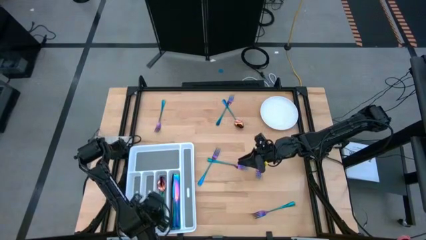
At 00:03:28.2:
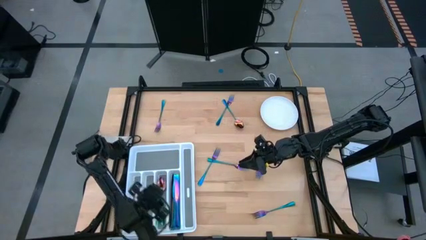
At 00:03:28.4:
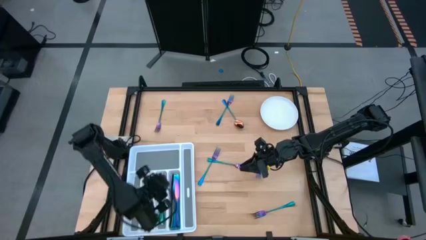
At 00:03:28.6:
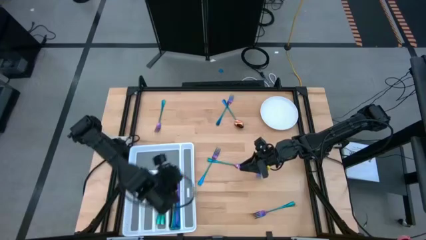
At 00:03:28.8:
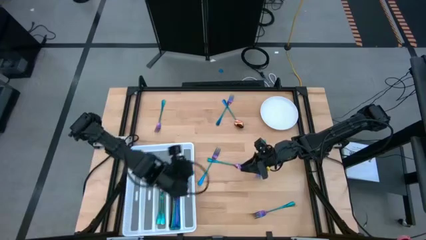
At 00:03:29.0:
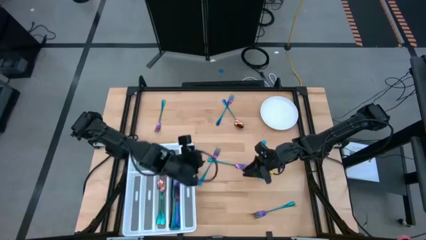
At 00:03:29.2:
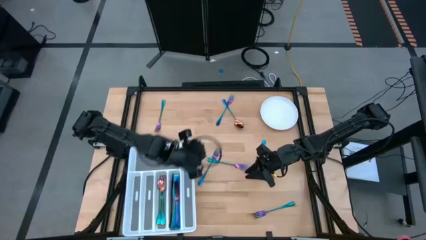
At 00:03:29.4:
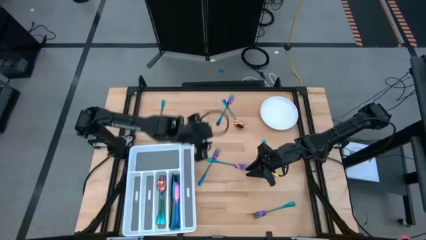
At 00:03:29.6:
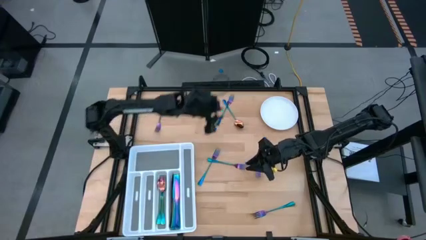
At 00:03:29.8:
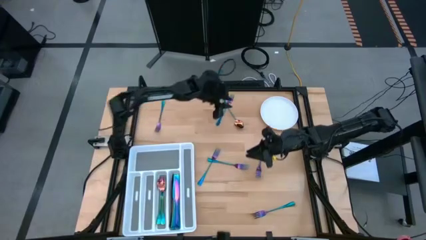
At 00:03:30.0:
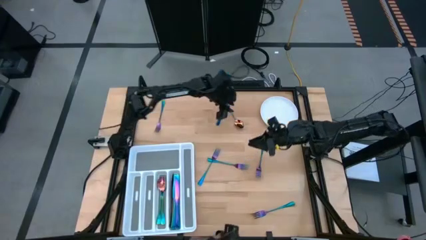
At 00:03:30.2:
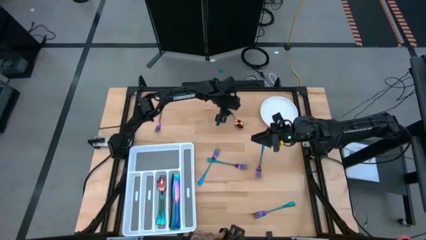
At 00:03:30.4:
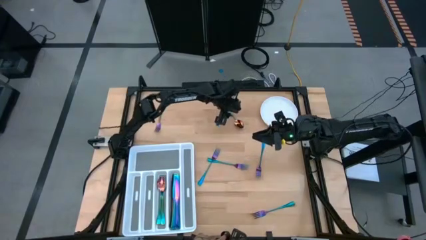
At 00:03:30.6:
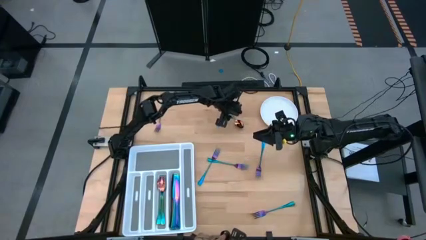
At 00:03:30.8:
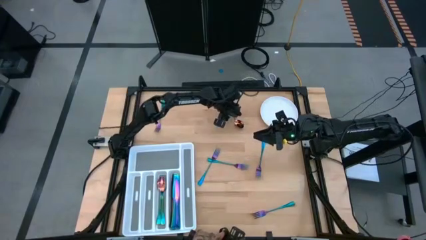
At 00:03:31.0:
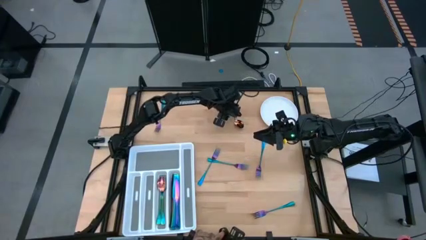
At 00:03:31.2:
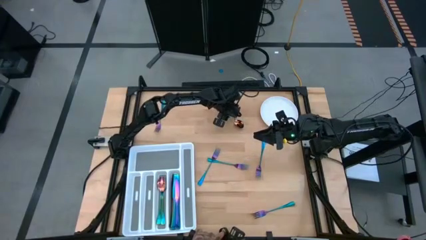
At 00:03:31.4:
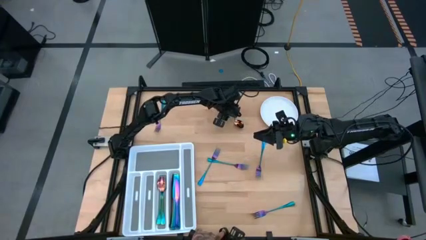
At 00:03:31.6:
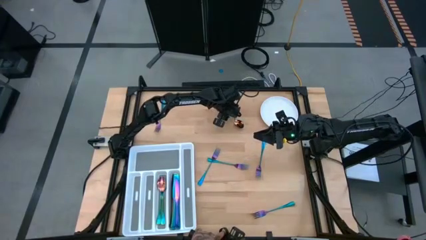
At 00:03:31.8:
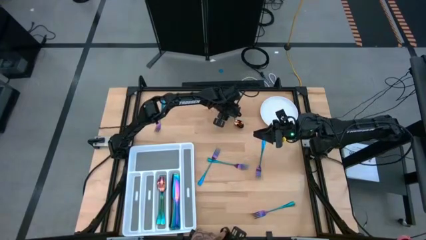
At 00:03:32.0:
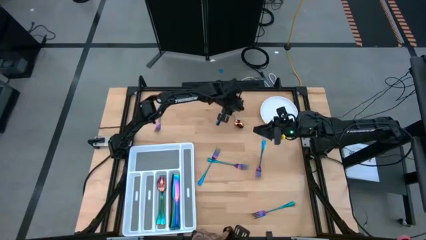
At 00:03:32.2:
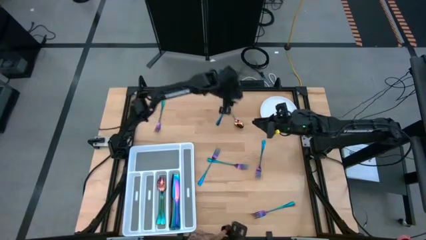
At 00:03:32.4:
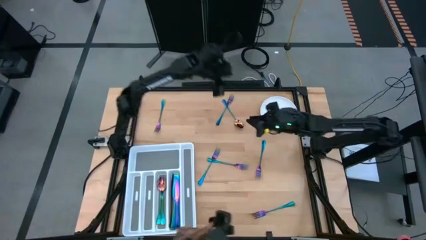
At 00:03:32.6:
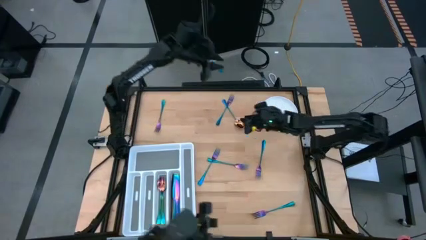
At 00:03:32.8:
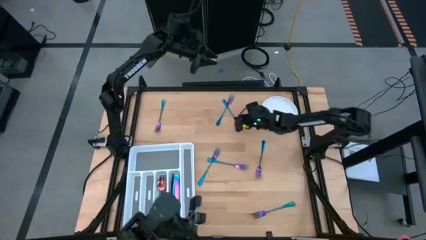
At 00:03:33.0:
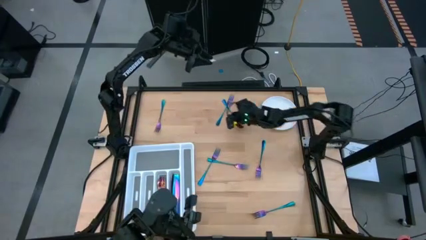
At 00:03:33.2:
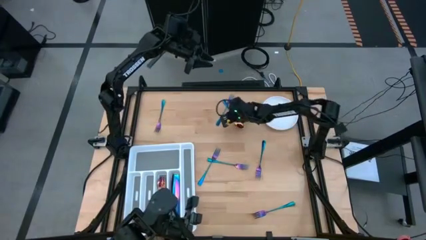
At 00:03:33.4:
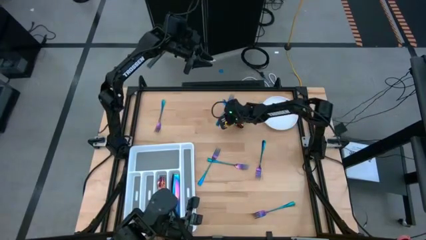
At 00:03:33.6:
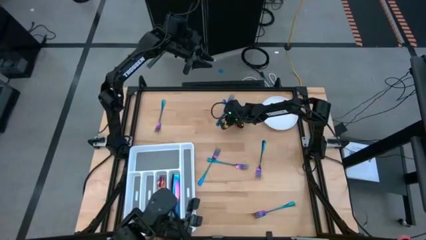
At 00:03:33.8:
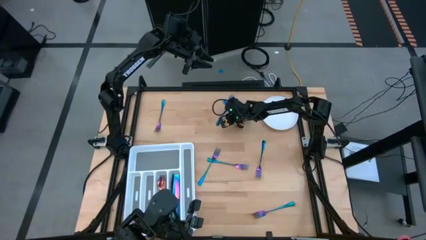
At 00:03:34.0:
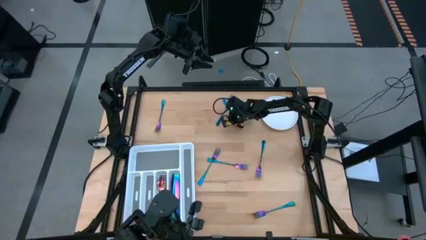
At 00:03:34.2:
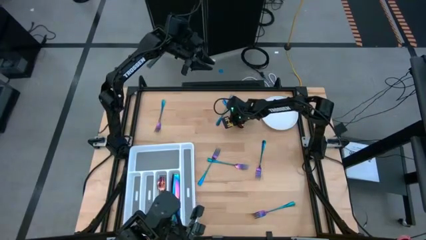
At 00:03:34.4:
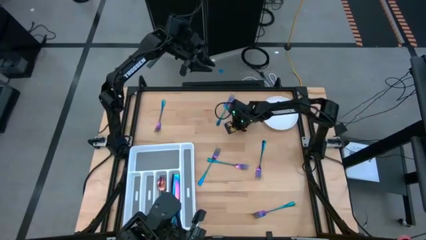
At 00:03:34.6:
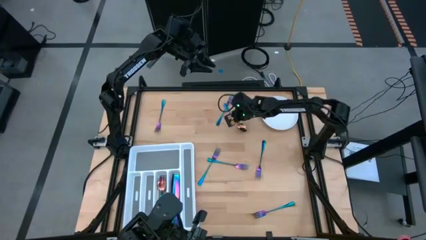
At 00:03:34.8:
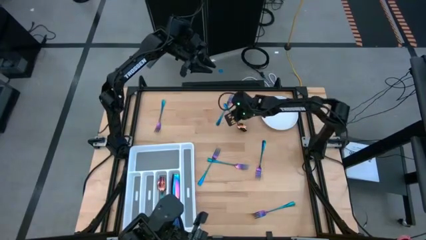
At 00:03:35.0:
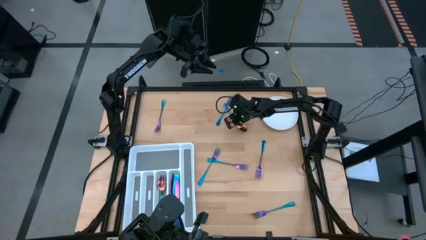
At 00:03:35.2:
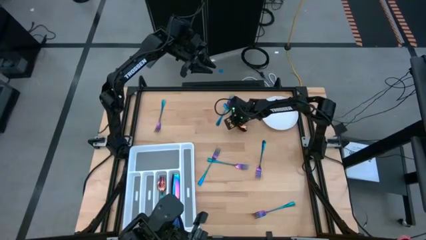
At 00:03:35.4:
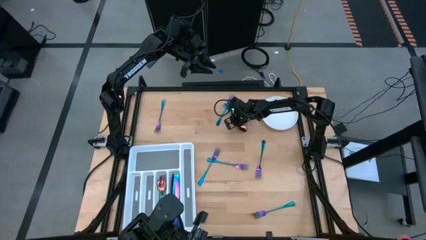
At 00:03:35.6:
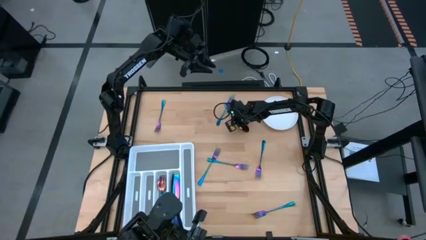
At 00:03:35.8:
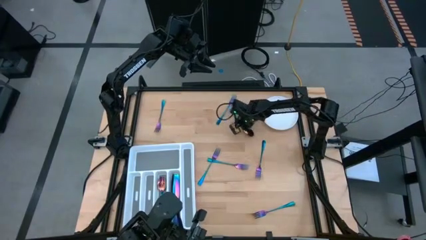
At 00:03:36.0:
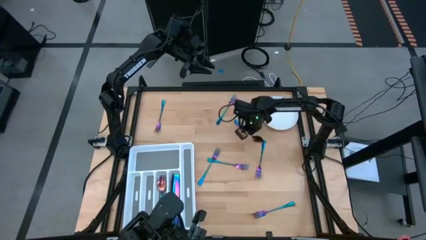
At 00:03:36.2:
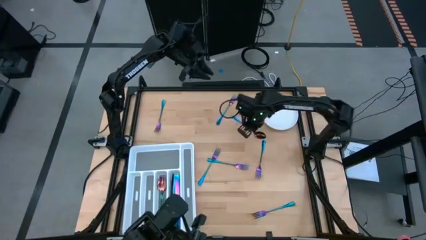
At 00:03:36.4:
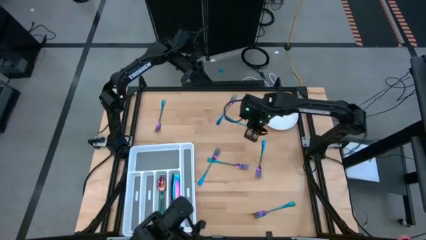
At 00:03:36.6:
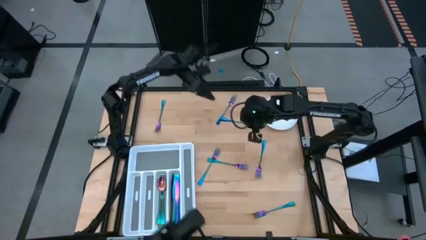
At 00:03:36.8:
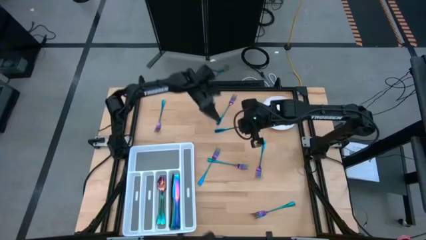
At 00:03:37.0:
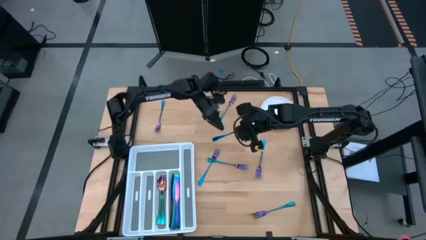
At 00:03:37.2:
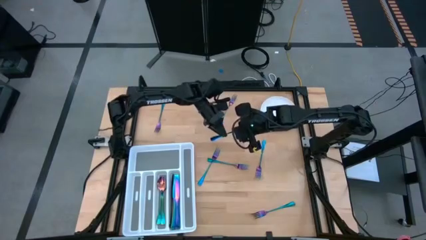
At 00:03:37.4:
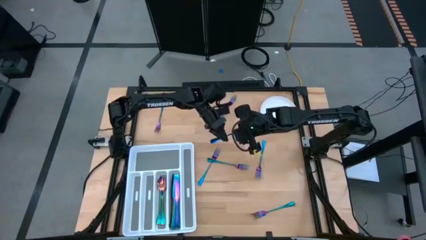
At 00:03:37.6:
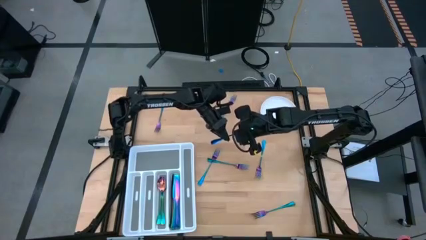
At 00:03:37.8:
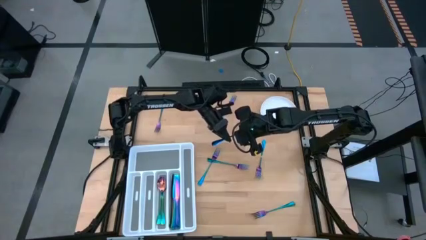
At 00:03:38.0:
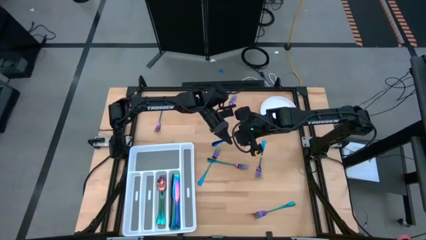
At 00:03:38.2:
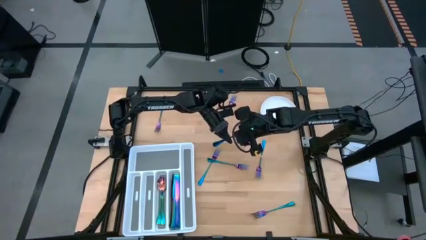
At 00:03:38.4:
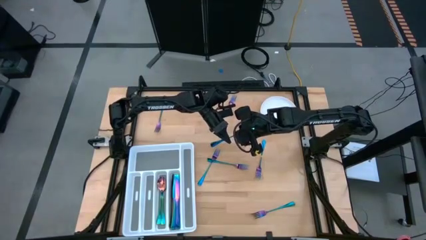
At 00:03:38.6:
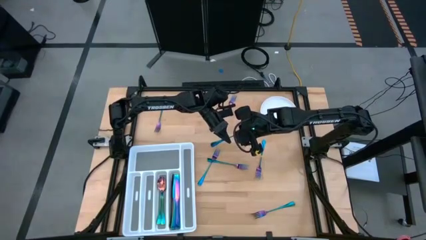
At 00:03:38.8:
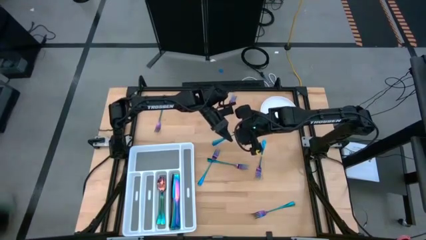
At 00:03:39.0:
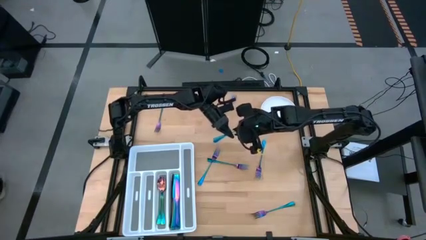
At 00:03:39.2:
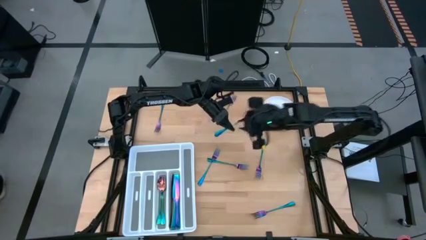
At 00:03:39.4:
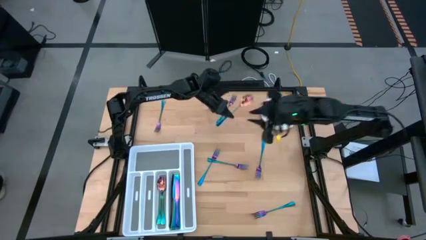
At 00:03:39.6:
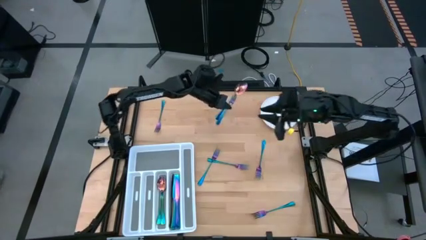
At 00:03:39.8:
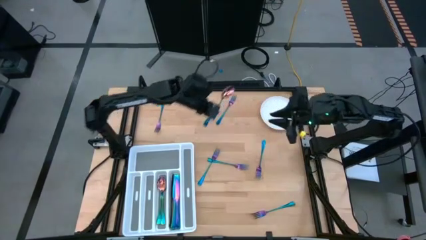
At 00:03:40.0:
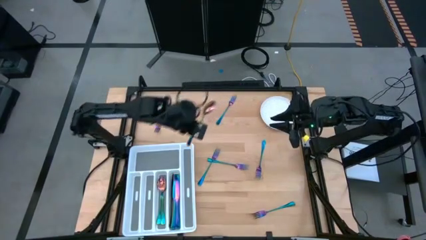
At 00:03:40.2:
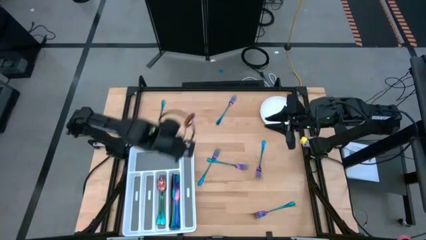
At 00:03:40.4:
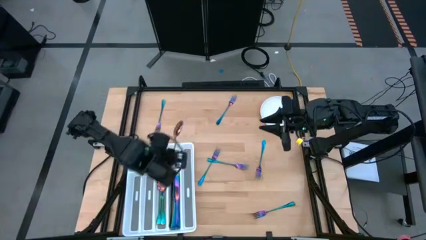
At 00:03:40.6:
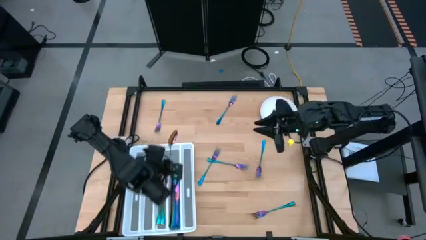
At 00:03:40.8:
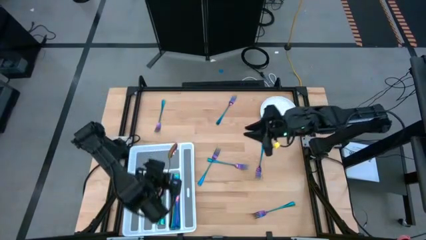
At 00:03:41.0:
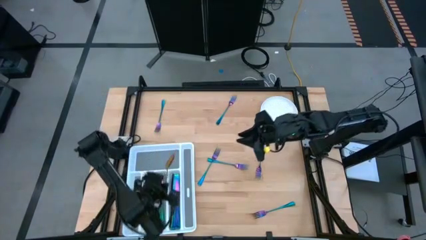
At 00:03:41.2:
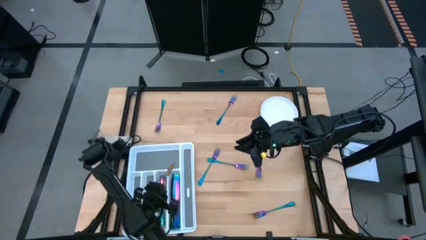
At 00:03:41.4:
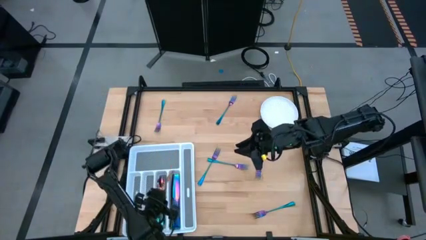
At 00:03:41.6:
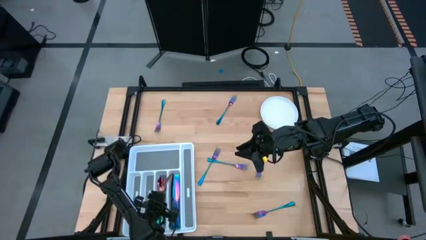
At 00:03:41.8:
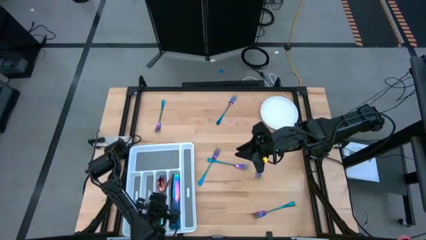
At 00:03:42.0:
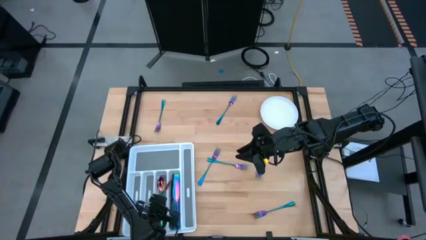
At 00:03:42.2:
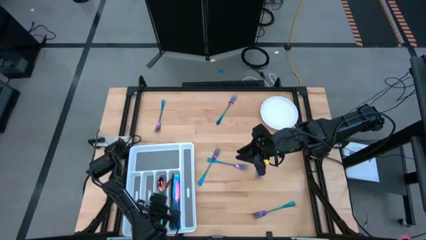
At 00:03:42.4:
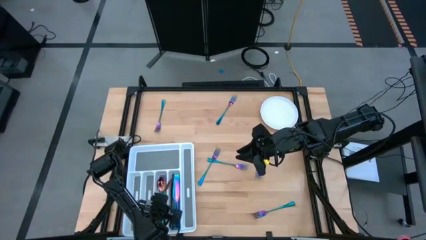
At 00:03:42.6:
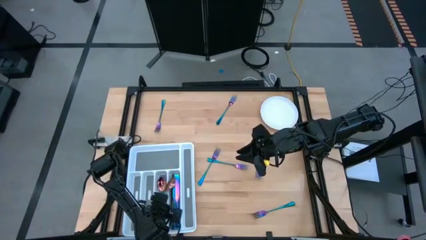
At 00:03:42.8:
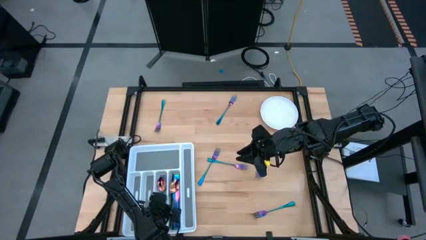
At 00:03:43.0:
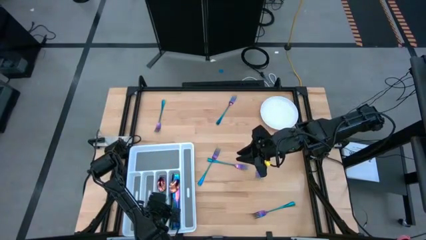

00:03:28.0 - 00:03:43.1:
Task: Sort silverware
Put the iridescent spoon into the cutlery tray

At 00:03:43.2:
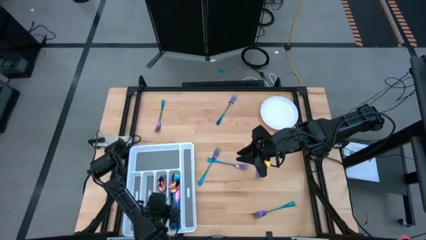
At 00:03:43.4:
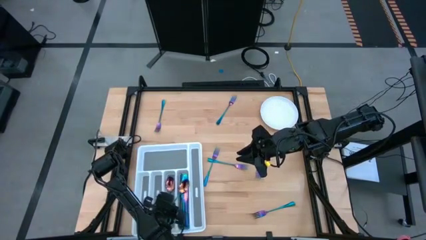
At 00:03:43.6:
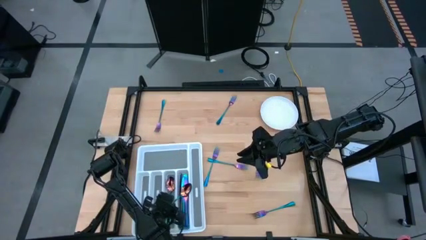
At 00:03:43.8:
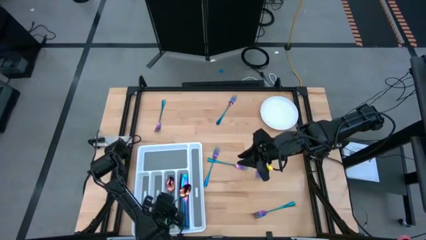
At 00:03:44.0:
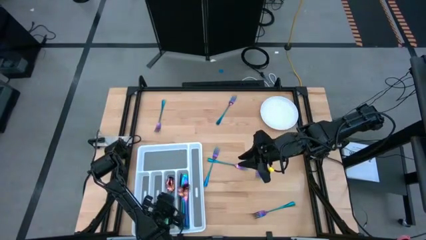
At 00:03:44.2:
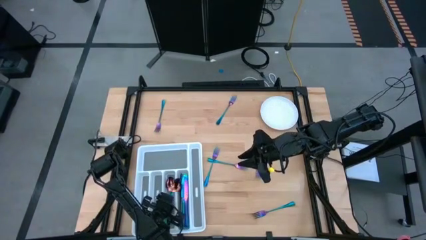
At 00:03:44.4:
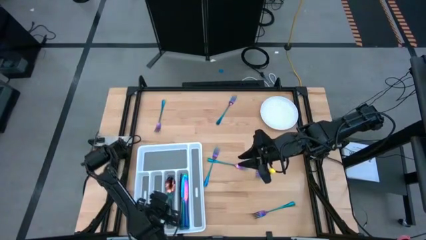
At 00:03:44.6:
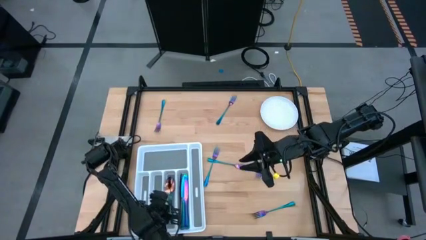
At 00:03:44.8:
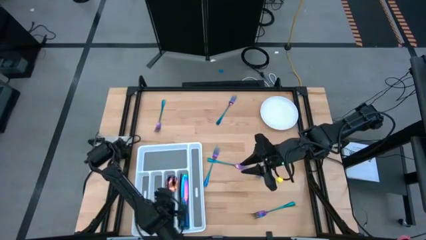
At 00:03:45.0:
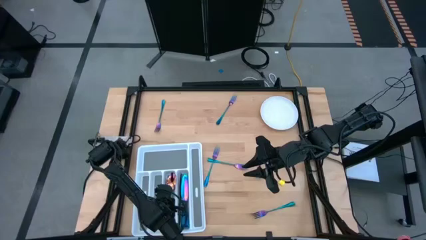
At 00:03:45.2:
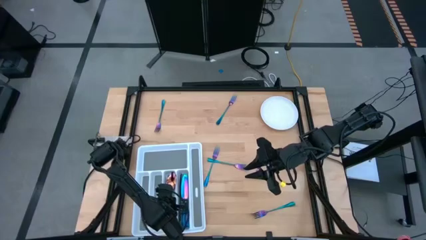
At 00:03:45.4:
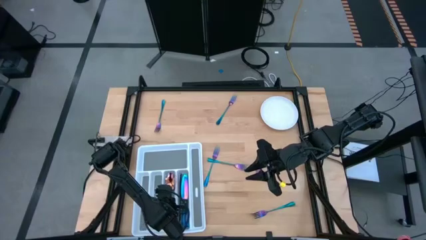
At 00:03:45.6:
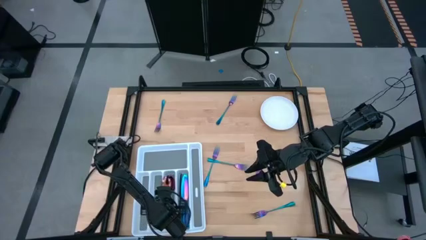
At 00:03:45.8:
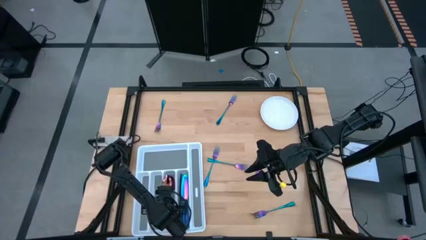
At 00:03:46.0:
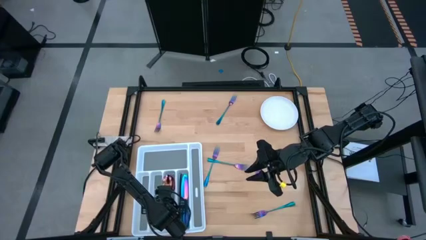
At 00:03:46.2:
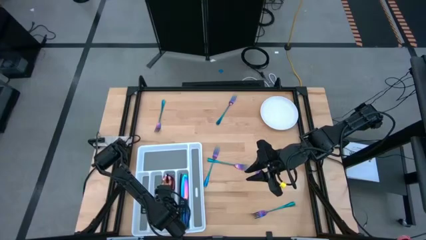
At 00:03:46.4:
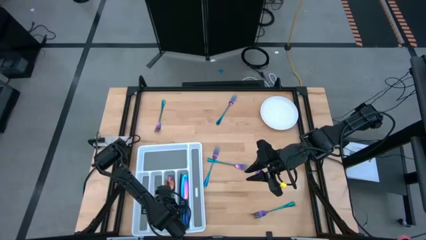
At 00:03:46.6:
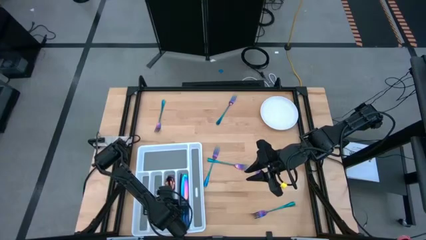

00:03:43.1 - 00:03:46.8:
Put the iridescent spoon into the cutlery tray
